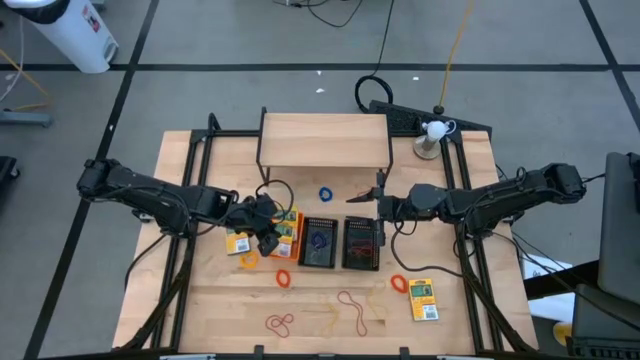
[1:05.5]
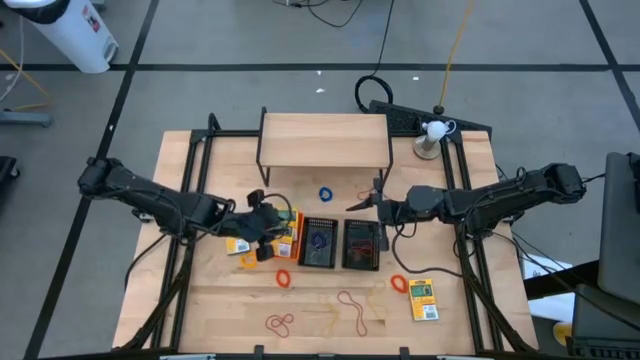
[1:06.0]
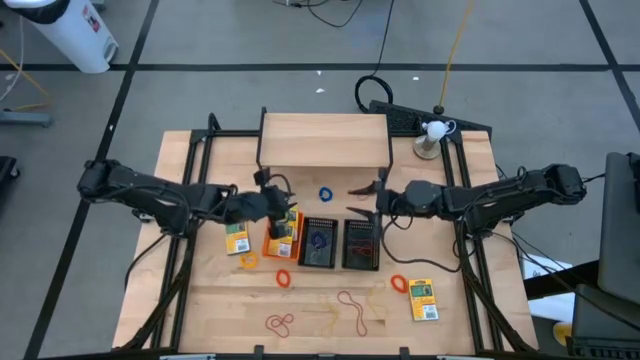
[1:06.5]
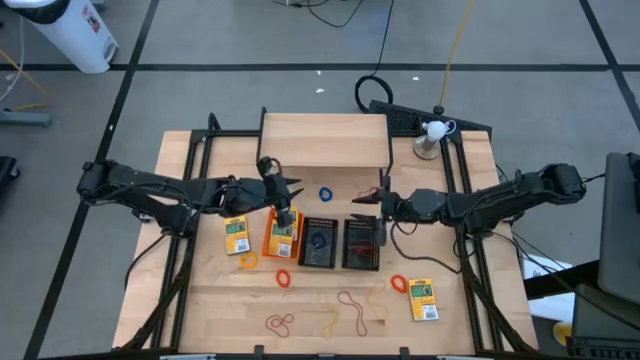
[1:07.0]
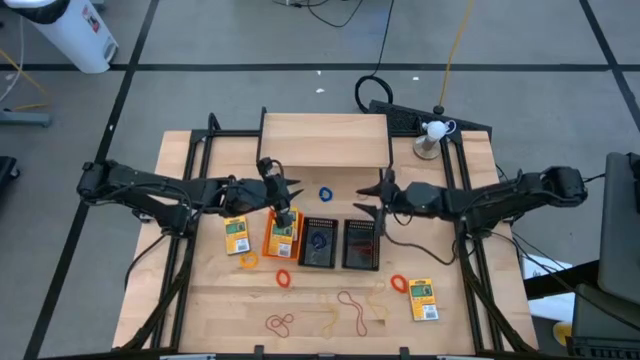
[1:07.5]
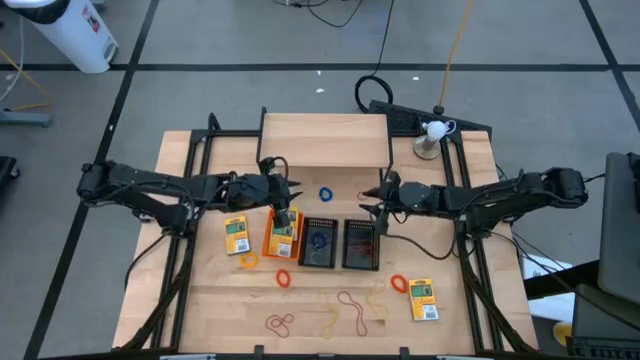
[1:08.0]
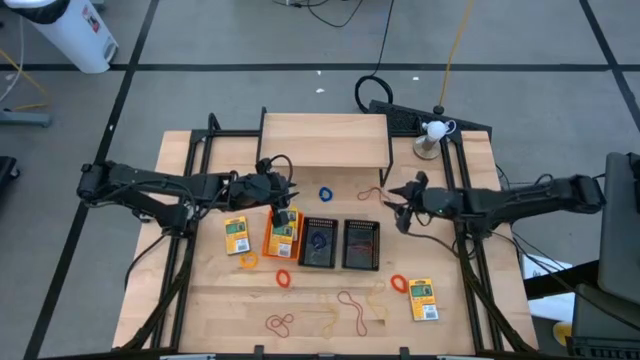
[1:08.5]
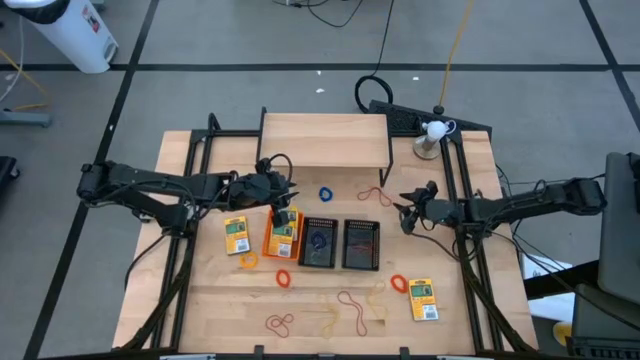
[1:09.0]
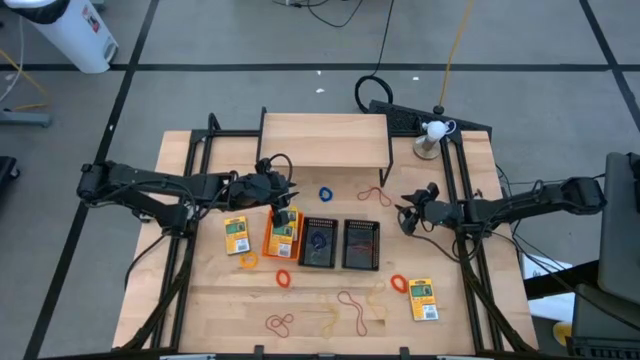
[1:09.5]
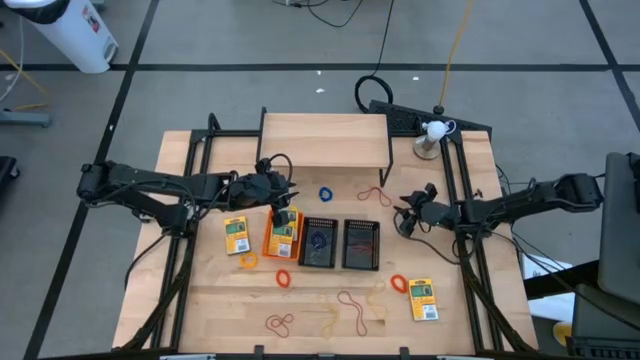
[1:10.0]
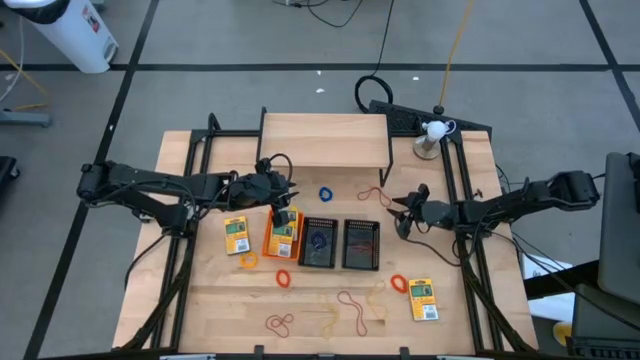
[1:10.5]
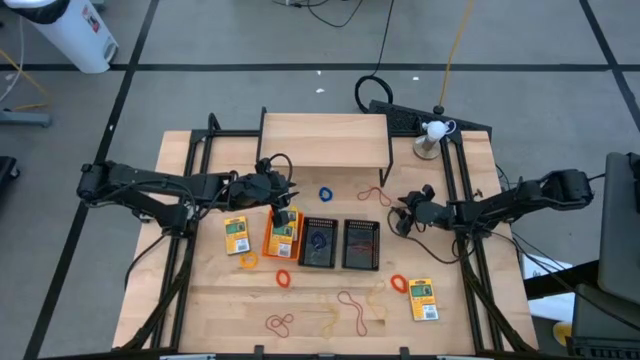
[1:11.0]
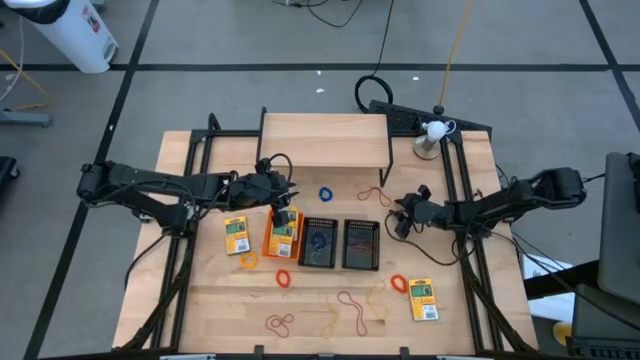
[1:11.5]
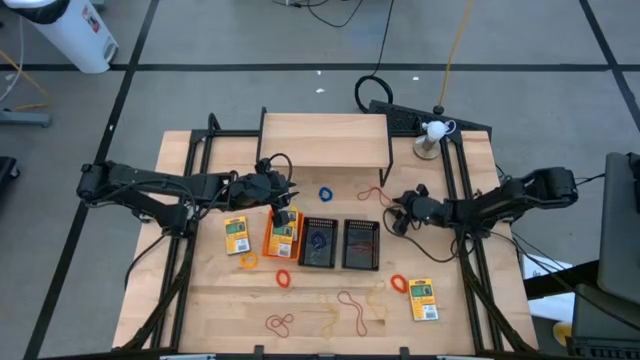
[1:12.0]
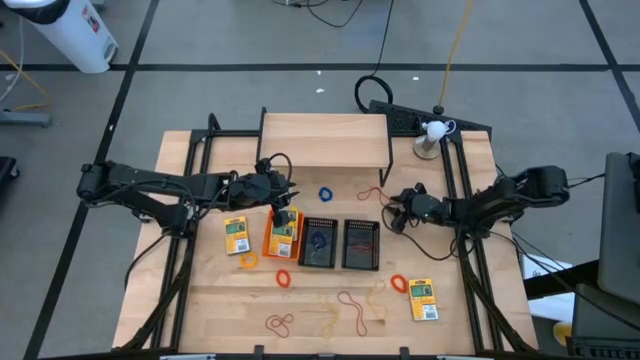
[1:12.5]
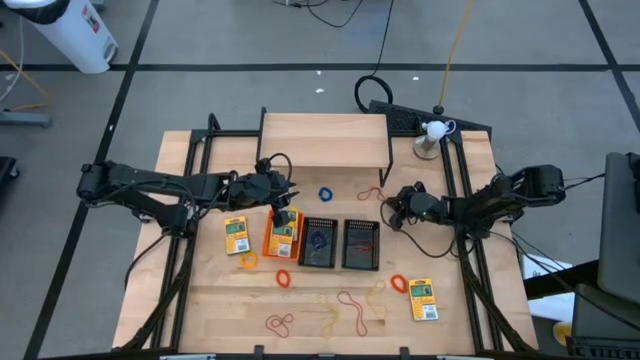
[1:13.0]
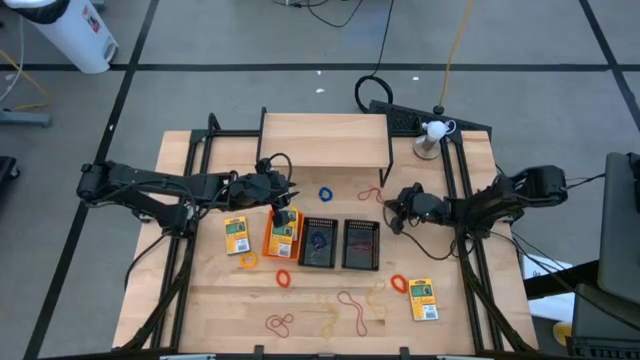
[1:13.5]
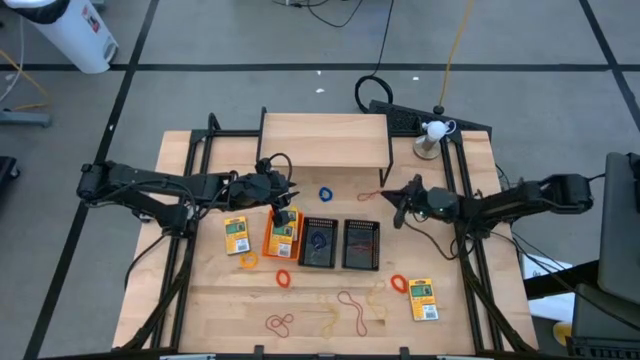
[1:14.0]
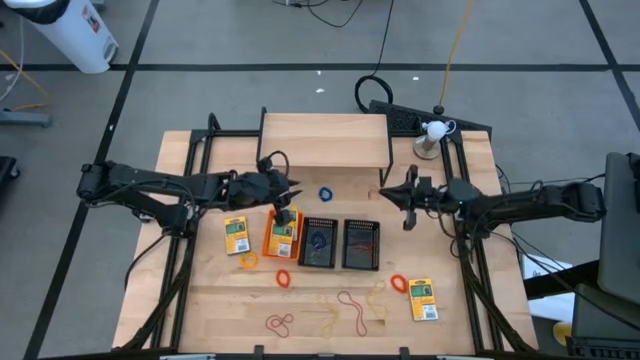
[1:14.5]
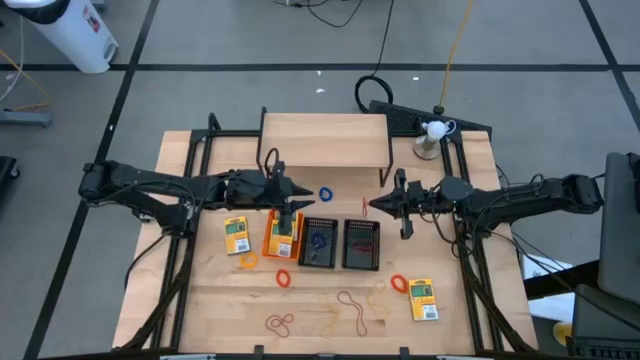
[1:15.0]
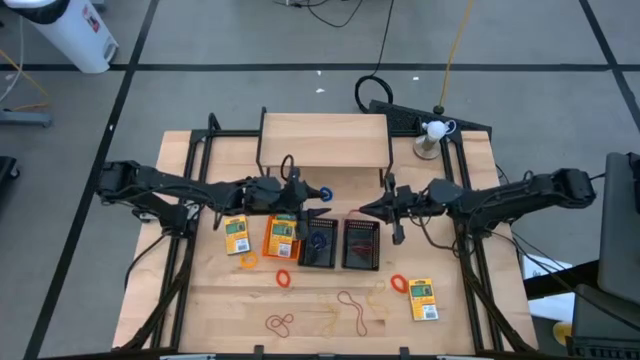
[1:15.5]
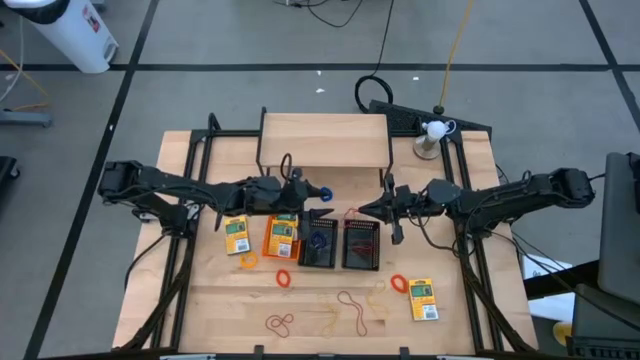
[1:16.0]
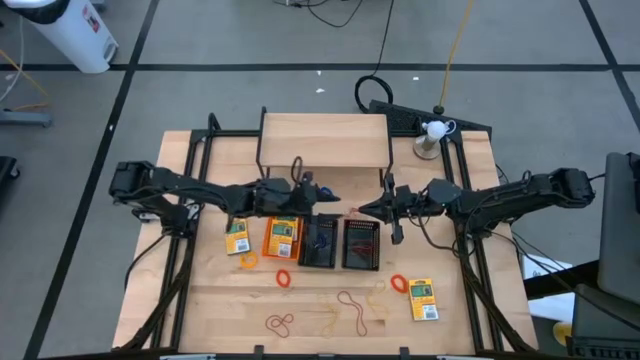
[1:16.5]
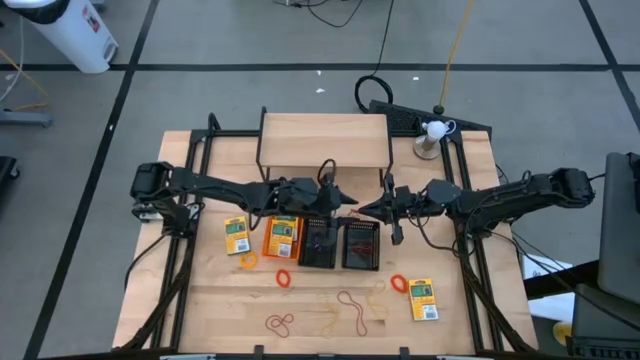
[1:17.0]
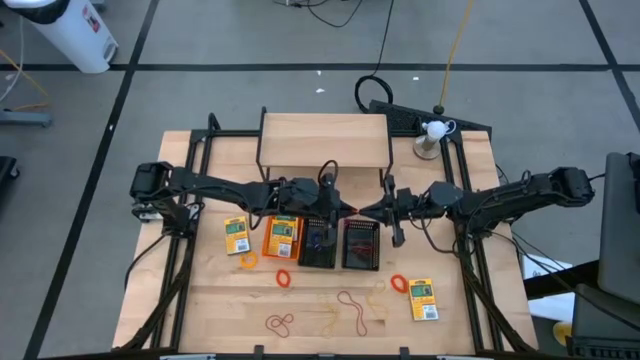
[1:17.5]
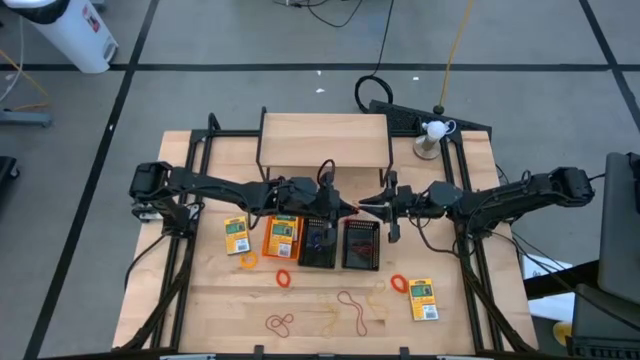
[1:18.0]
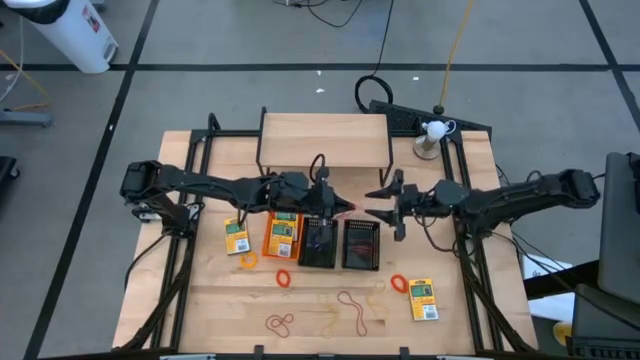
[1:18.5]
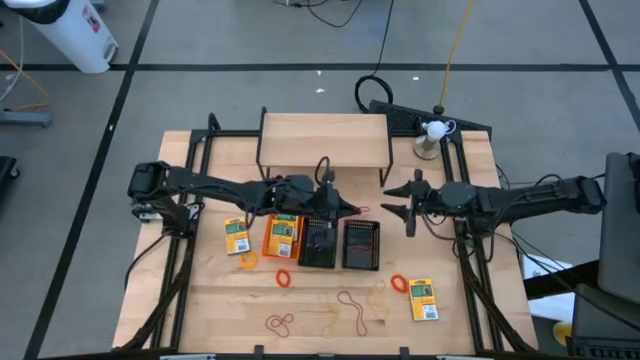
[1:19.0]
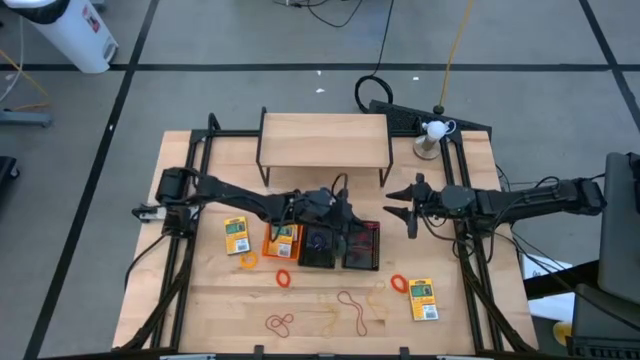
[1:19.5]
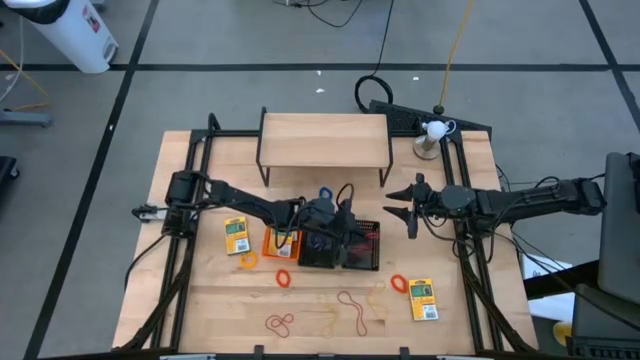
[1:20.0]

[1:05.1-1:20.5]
Task: Pick & Place Office Desk Supplies
Put the red rubber band into the right black bin

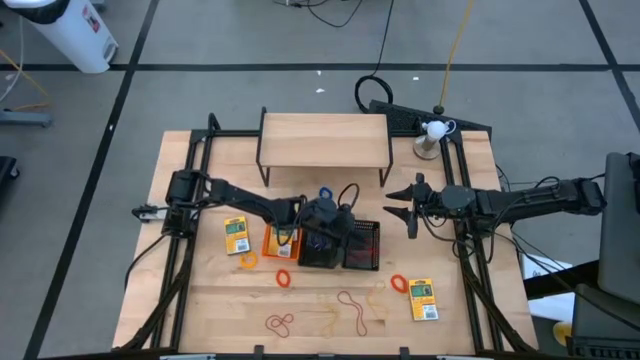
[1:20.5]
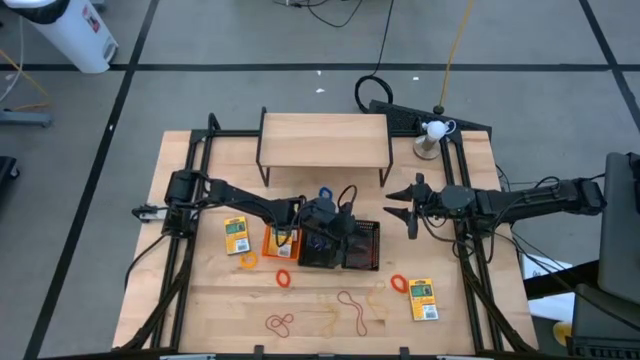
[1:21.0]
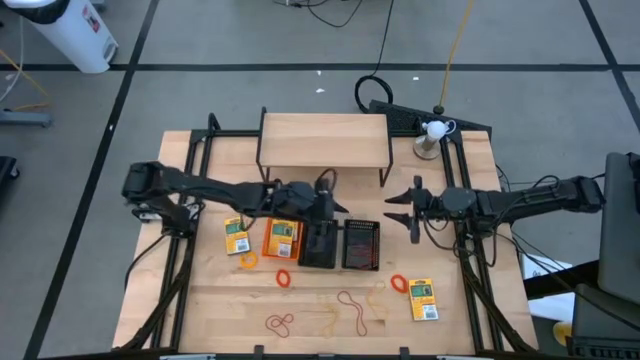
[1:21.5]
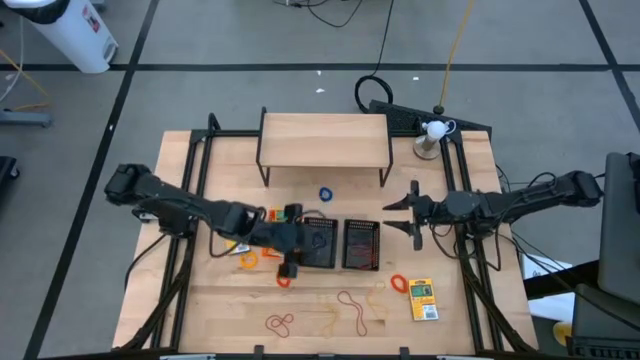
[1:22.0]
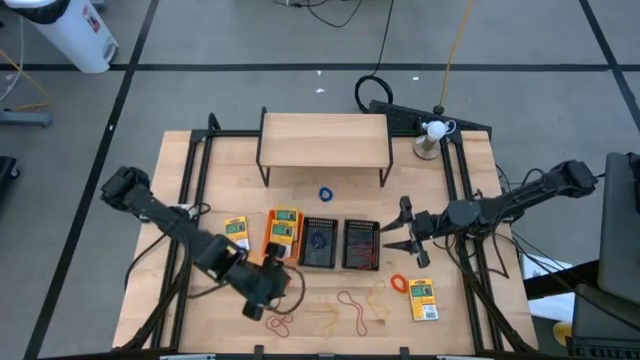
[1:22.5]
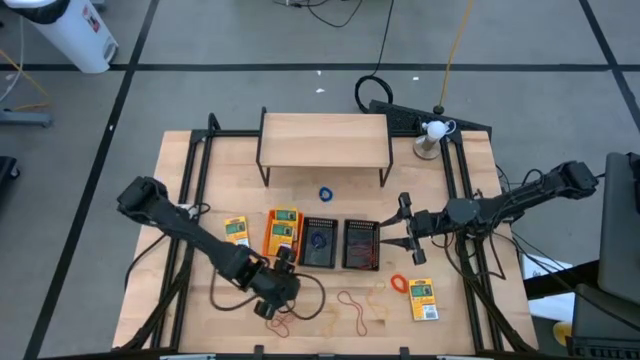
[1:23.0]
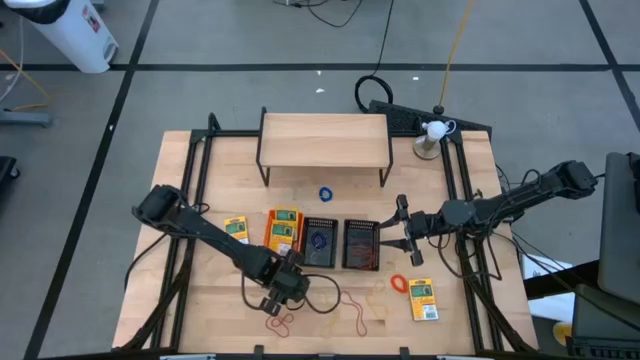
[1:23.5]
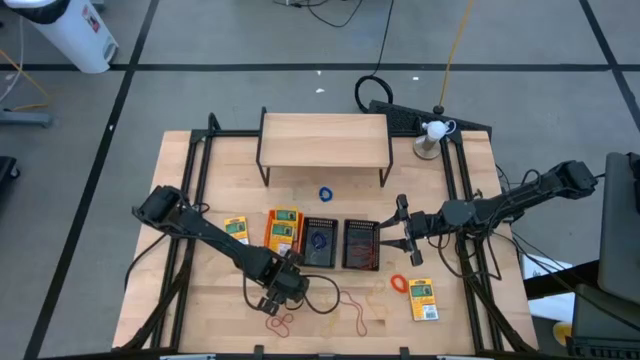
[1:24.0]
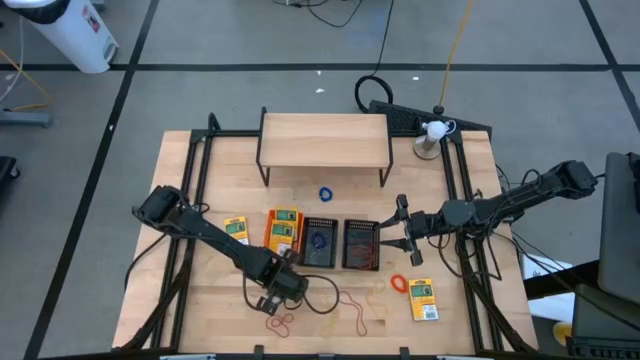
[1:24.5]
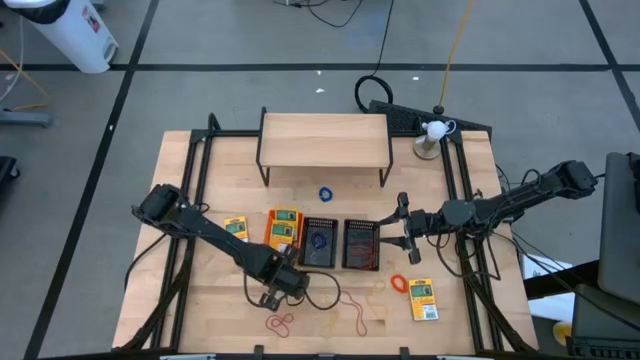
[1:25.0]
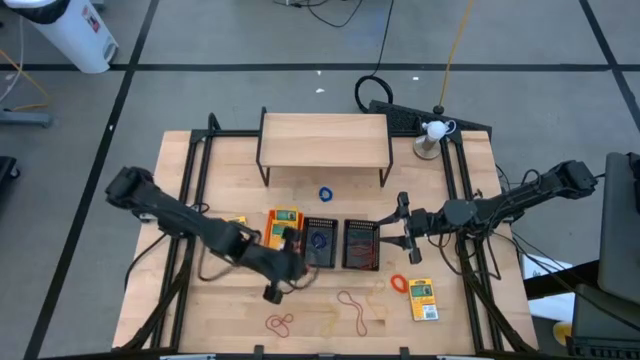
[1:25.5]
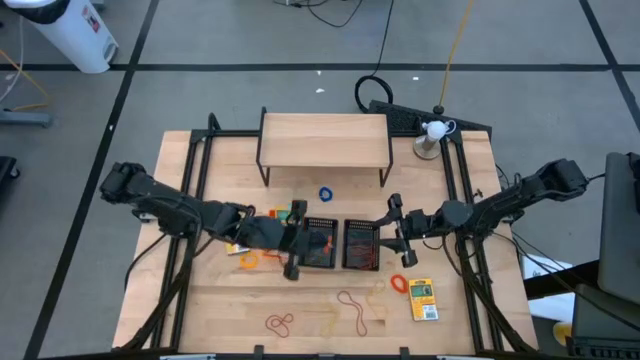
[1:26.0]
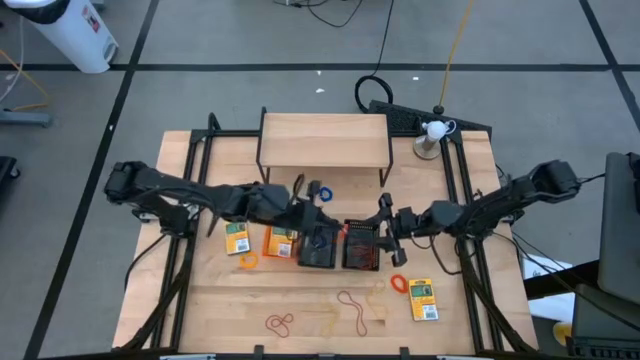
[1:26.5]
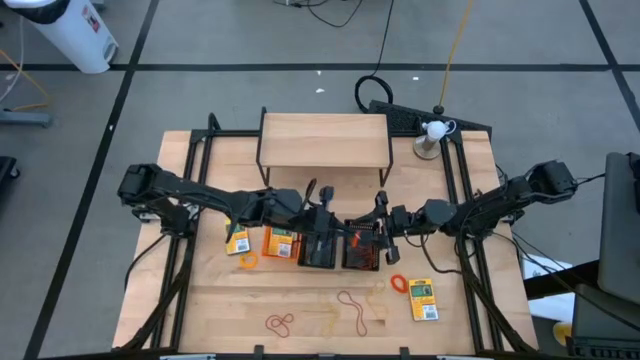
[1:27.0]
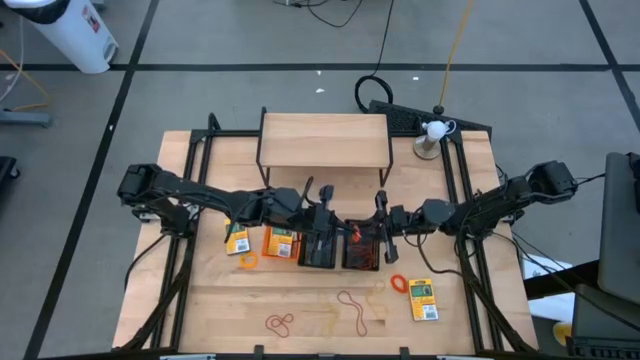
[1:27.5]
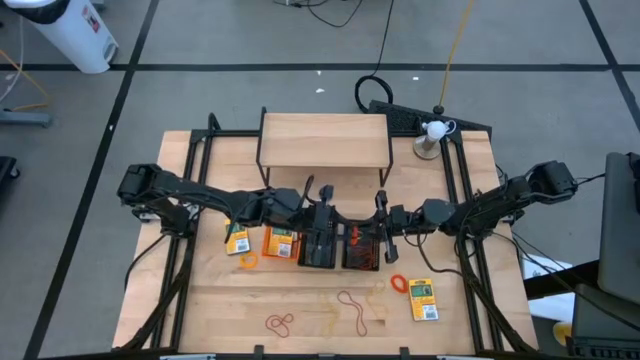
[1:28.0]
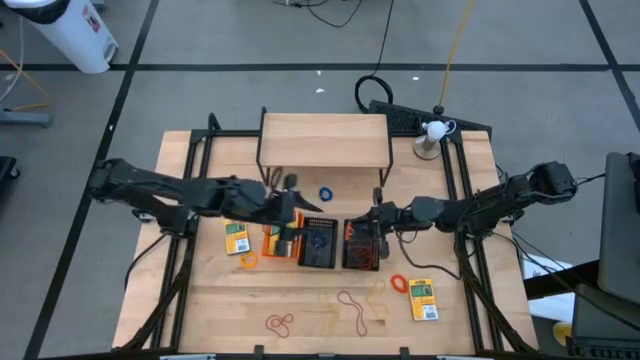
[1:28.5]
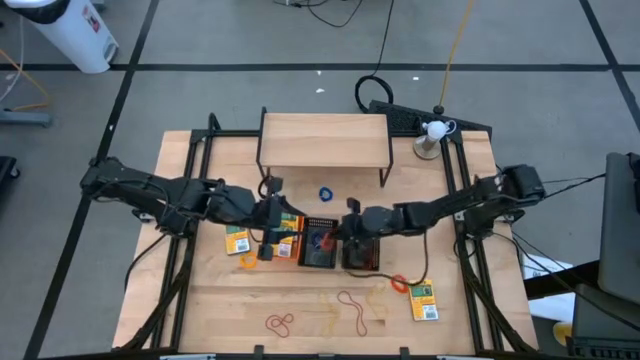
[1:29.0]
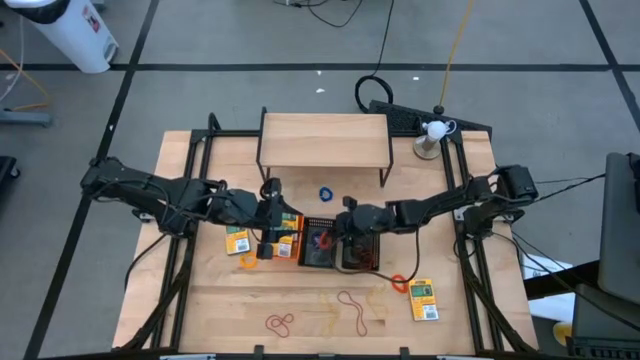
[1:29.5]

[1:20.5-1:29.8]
Put the orange spring rubber band into the left black bin
